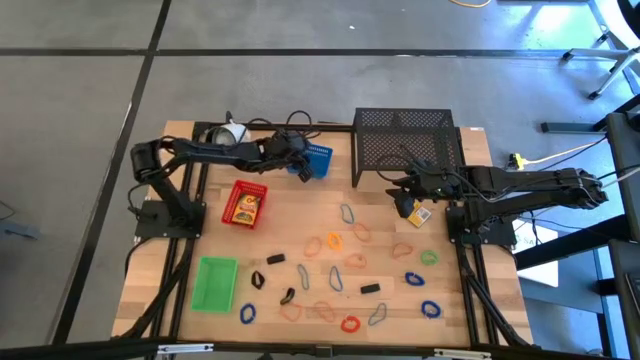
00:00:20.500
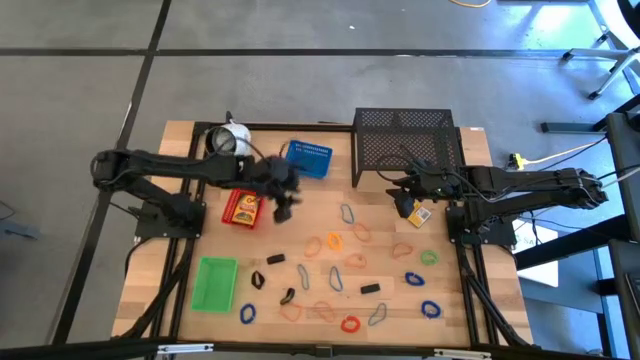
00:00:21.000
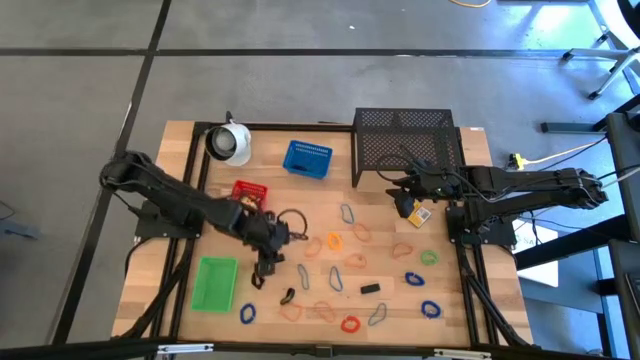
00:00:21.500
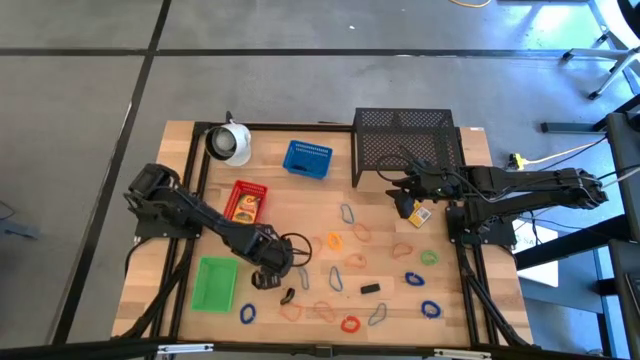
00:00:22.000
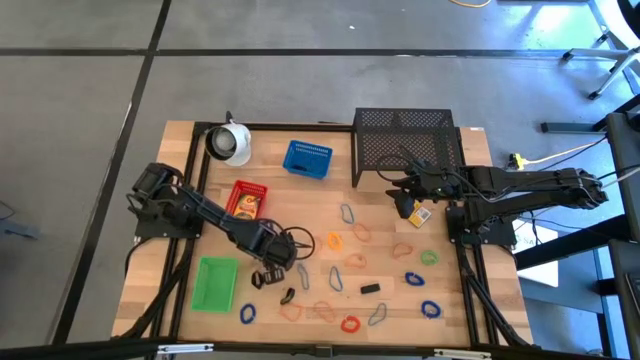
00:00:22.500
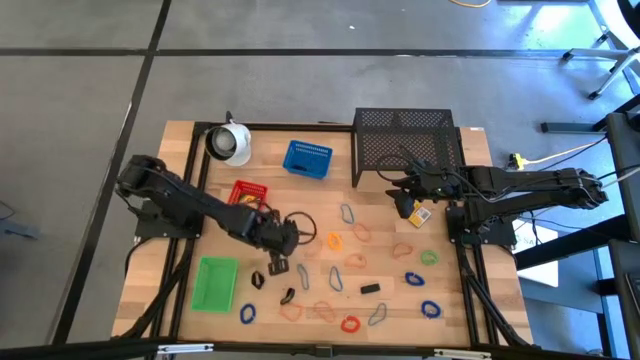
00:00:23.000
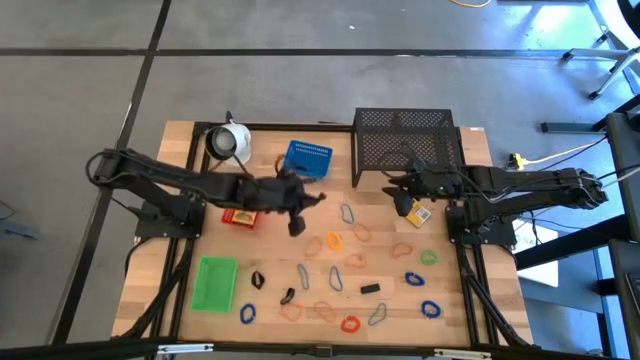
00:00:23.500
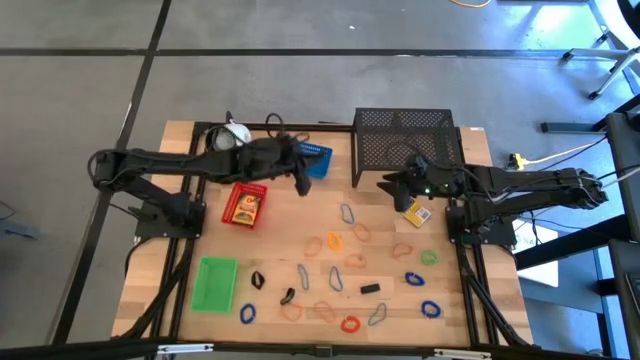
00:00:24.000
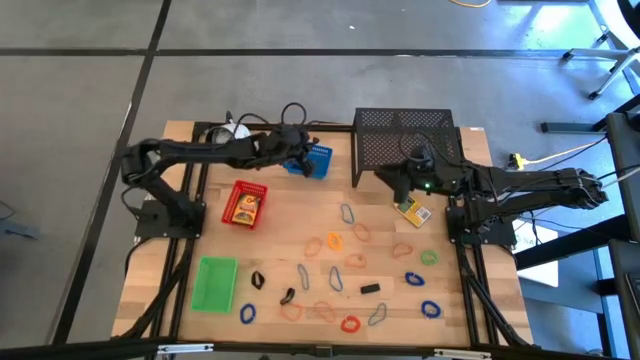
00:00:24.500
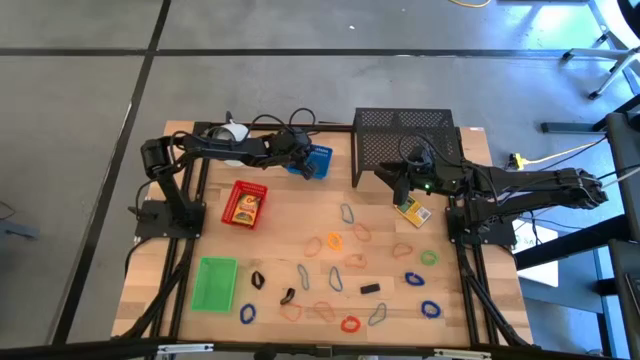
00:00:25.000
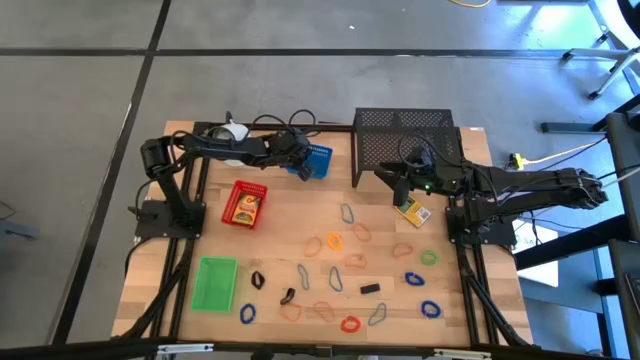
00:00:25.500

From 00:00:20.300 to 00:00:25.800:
Task: Pick & Place Office Desk Supplies
Put the black rubber band into the blue bin

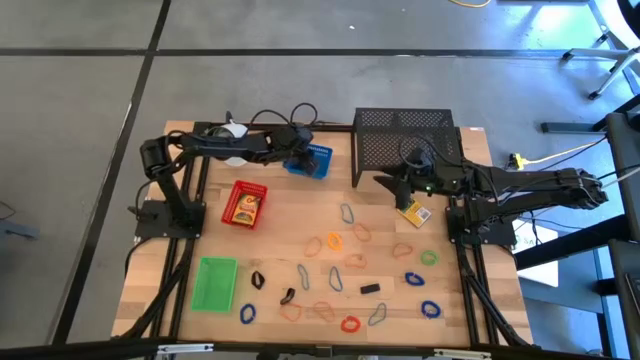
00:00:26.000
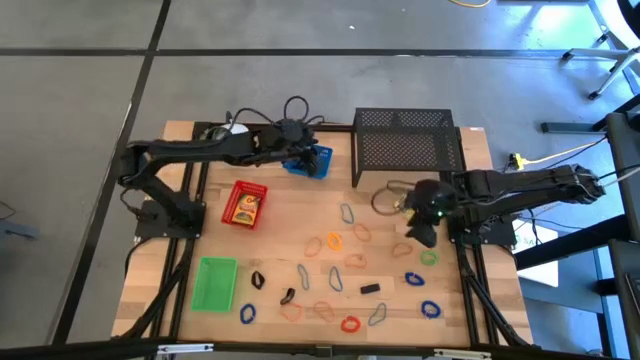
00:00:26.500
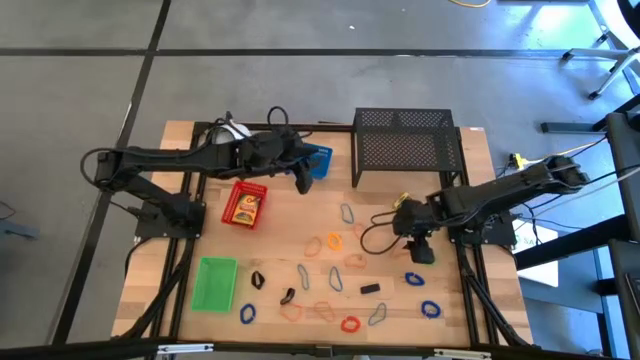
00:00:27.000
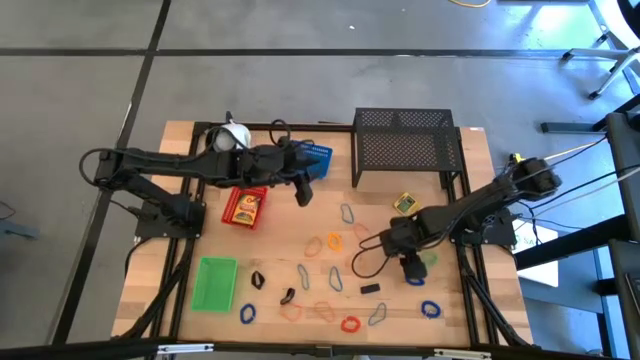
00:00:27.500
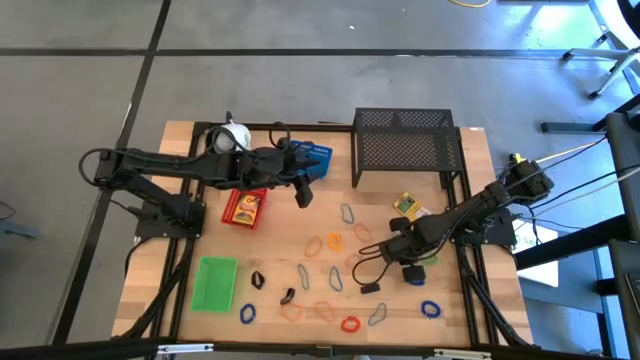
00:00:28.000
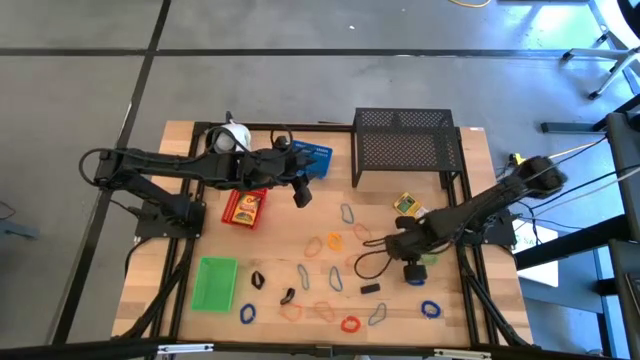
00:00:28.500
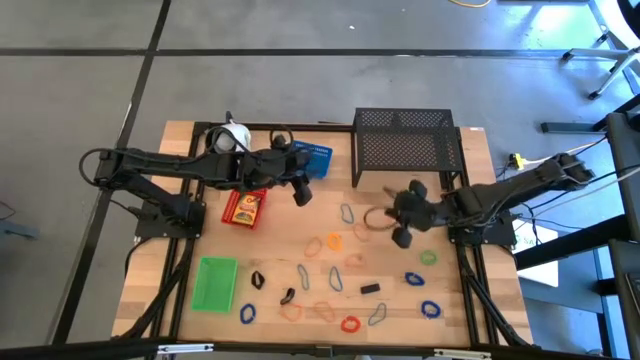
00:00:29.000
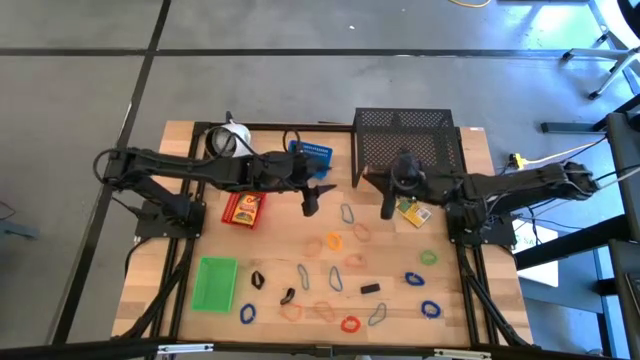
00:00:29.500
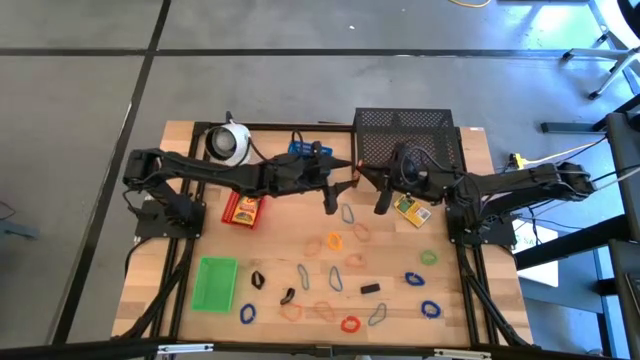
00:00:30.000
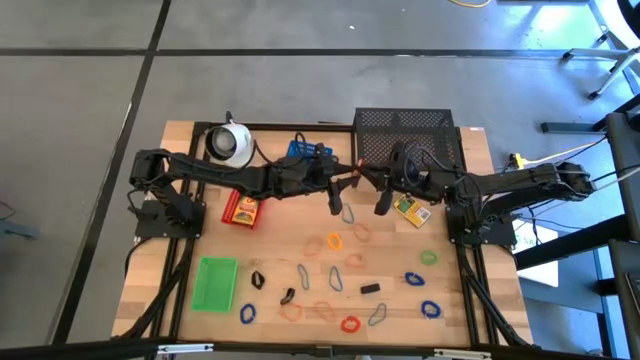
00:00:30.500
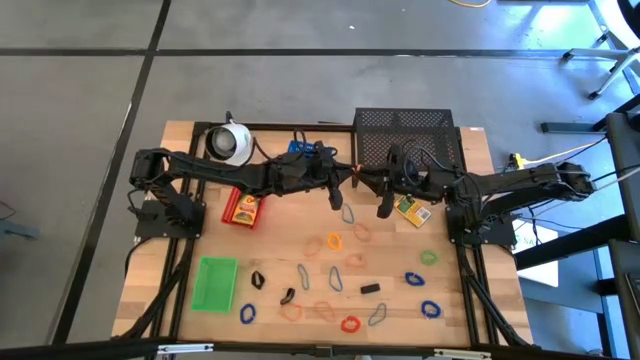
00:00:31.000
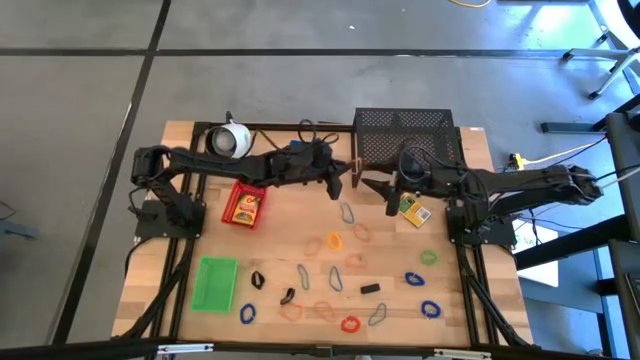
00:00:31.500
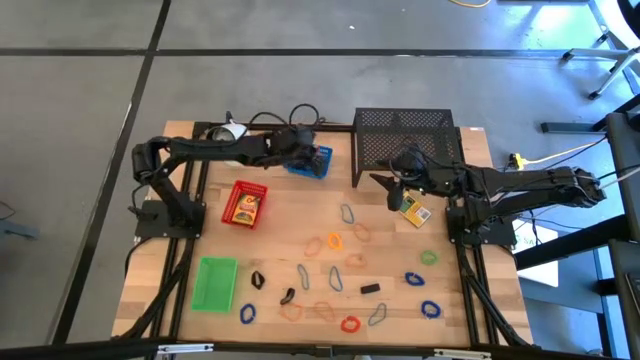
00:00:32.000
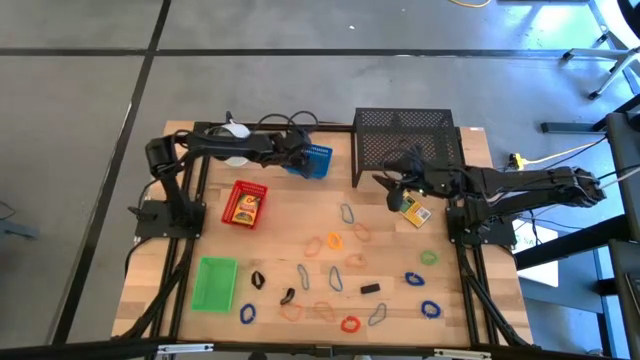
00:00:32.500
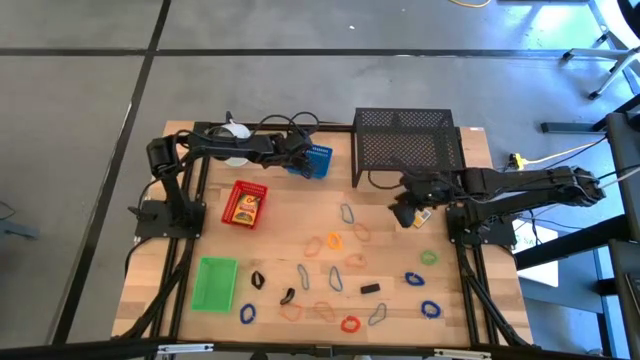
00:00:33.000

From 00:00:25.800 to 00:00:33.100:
Put the orange rubber band into the blue bin

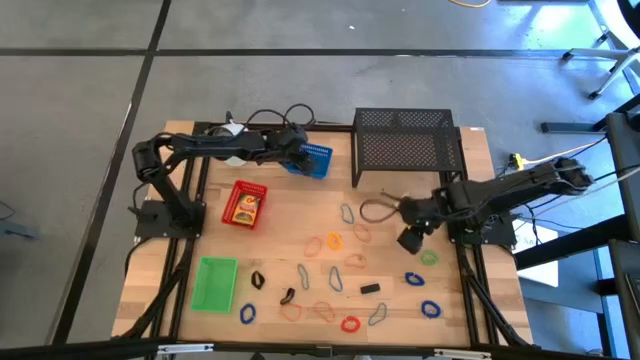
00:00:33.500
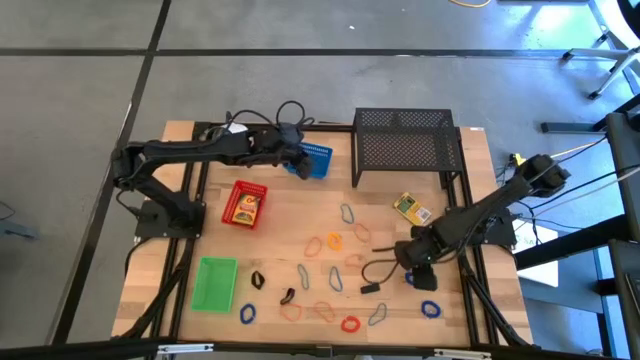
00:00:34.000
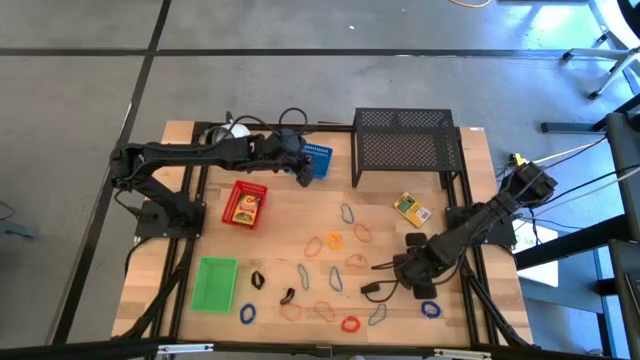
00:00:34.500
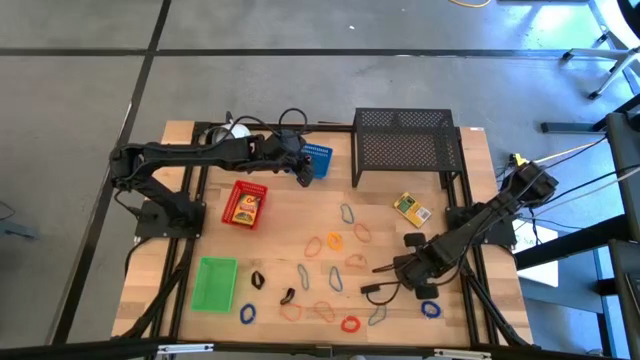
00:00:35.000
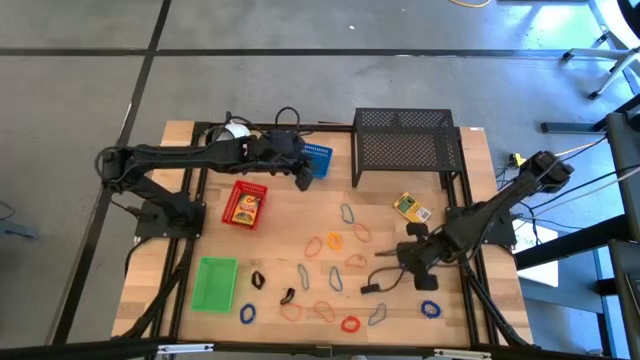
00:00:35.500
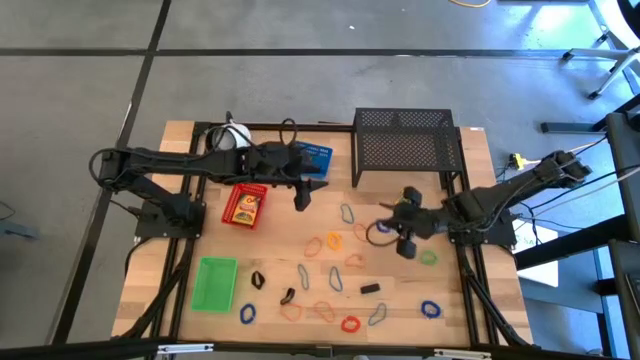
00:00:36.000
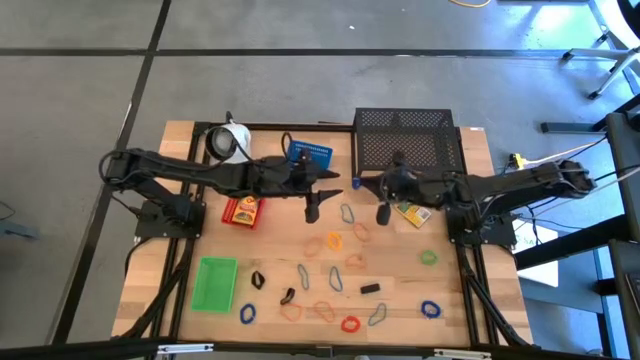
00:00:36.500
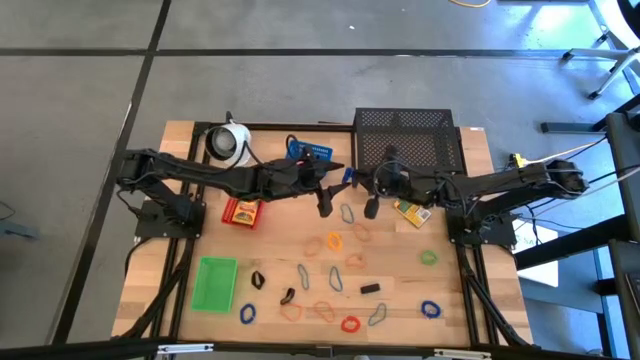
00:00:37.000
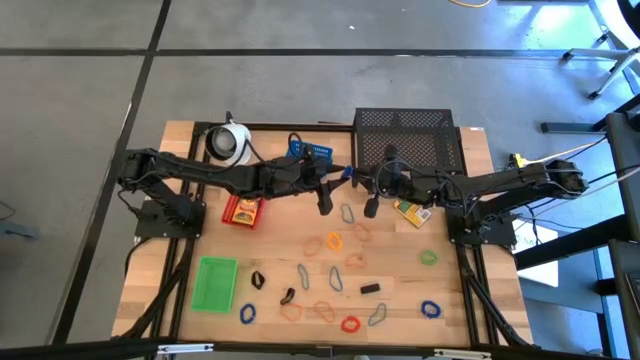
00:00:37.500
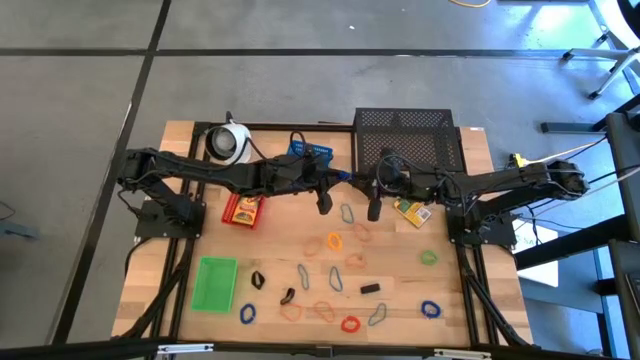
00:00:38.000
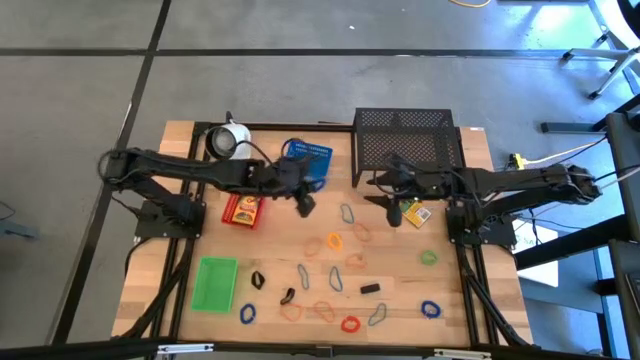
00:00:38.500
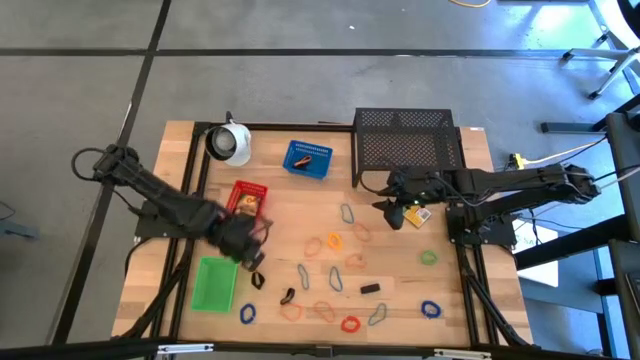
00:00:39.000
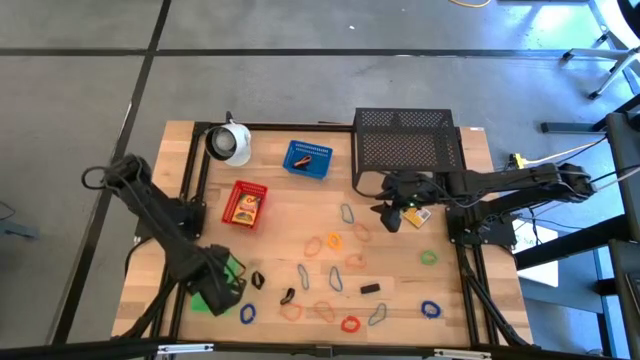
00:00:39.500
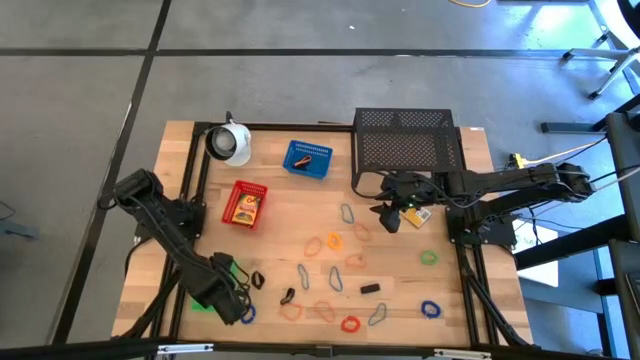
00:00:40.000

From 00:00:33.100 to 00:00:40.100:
Put the blue spring keychain into the green bin
